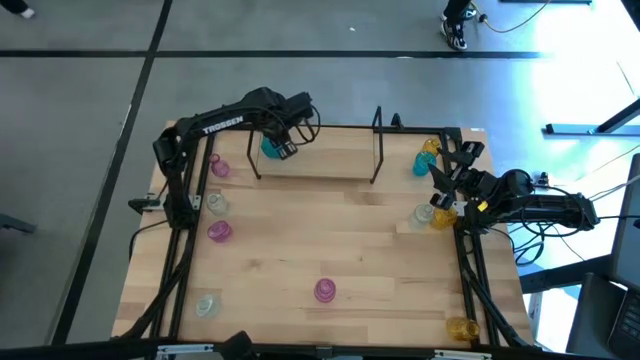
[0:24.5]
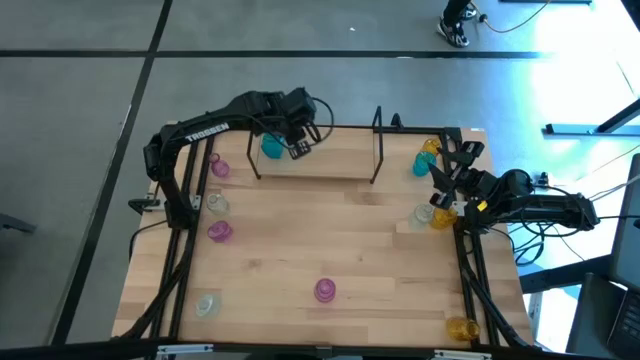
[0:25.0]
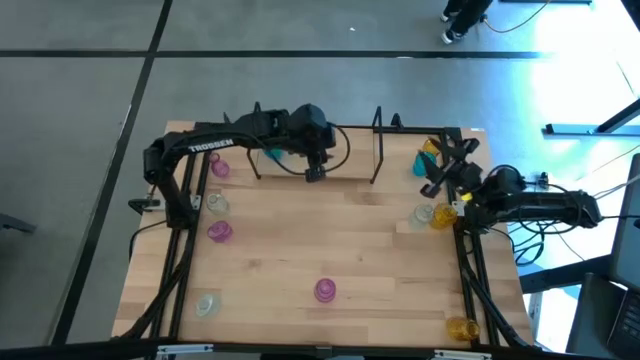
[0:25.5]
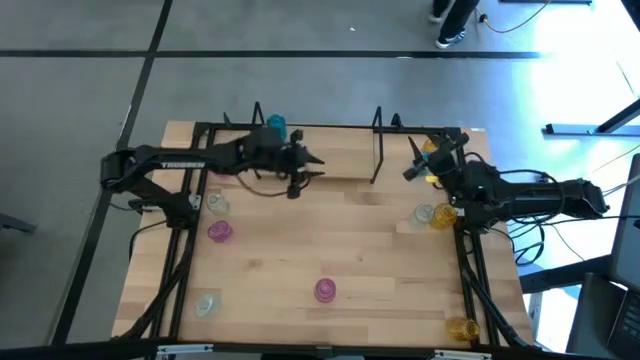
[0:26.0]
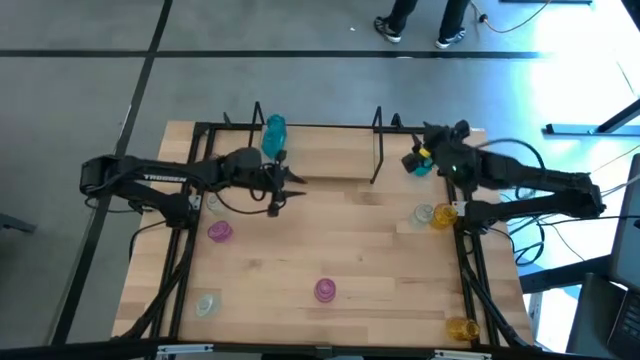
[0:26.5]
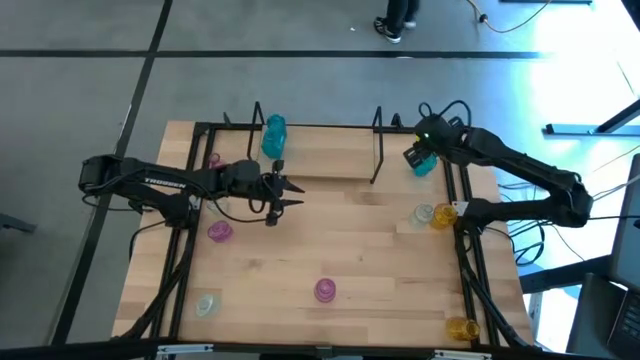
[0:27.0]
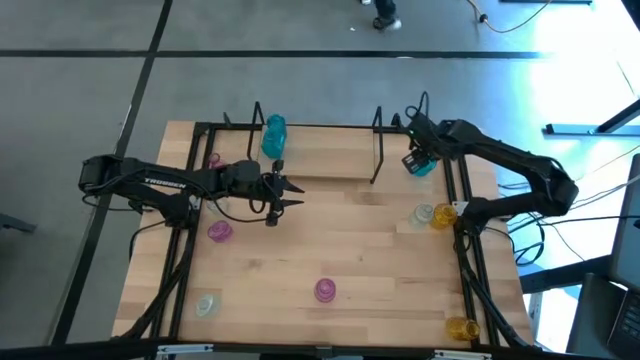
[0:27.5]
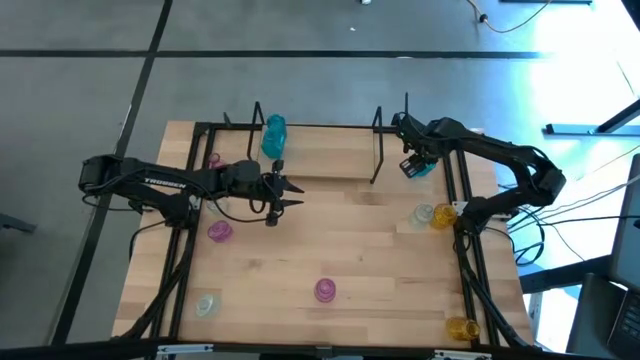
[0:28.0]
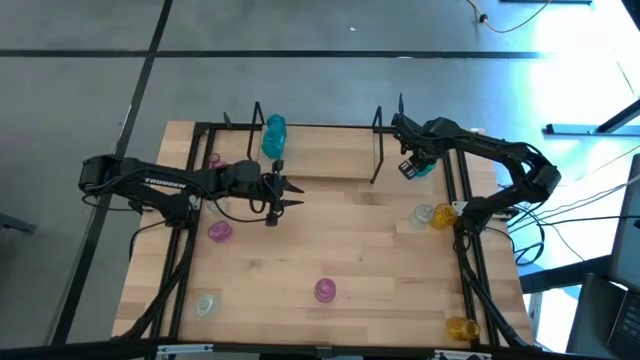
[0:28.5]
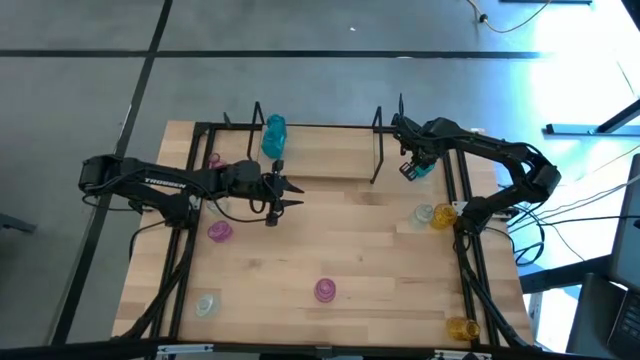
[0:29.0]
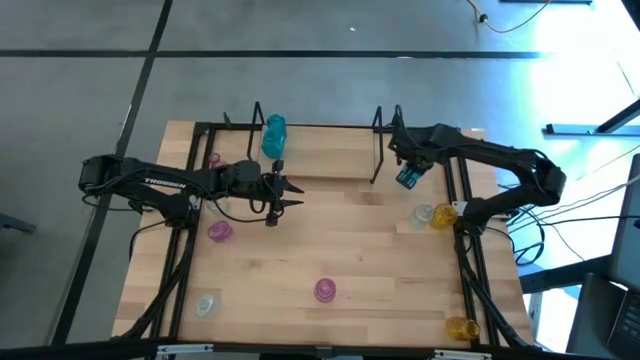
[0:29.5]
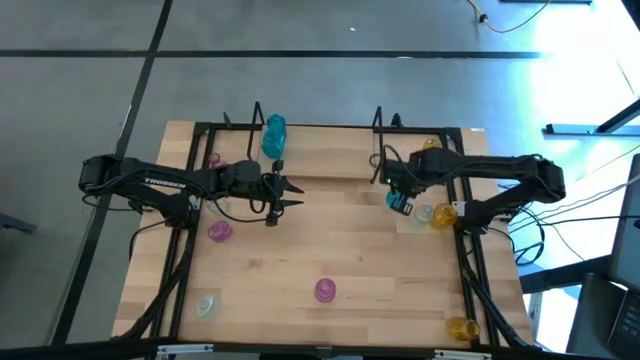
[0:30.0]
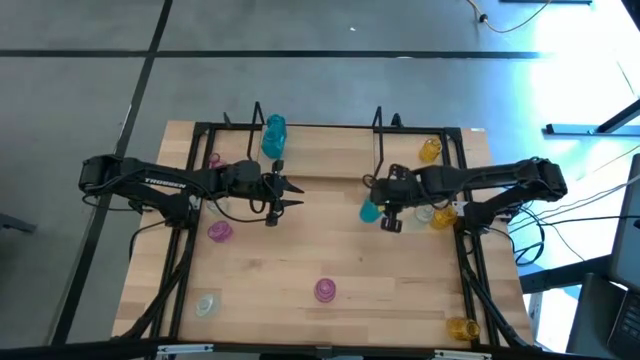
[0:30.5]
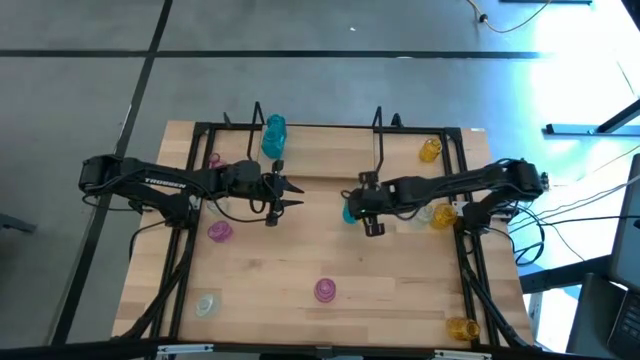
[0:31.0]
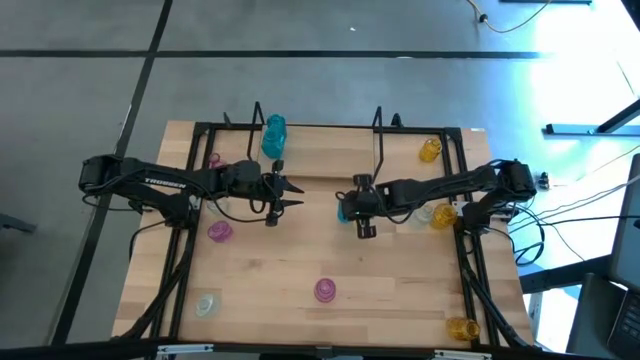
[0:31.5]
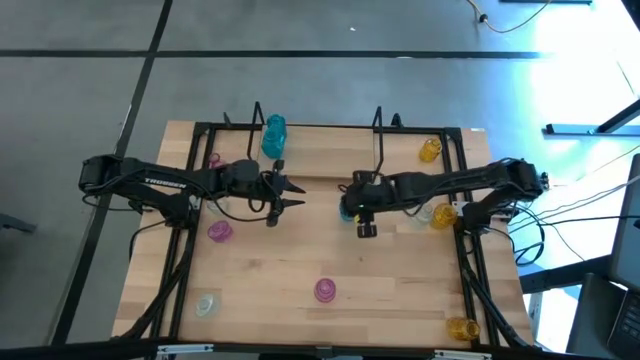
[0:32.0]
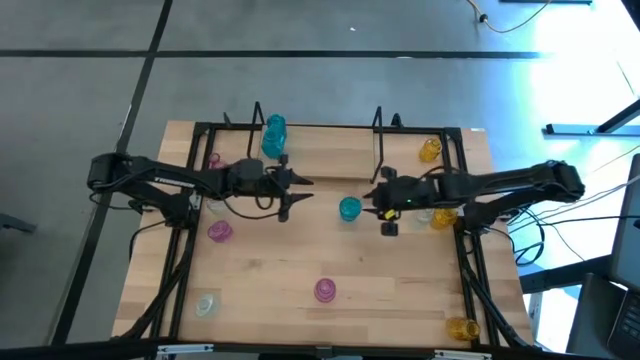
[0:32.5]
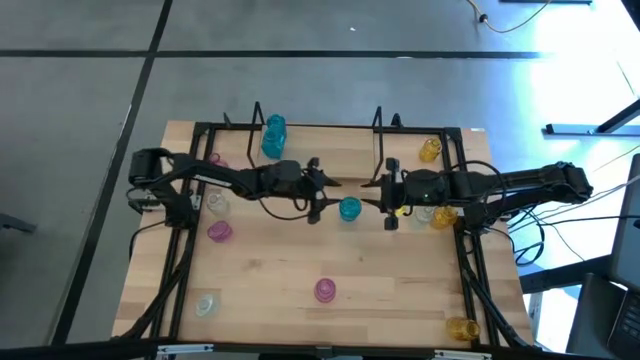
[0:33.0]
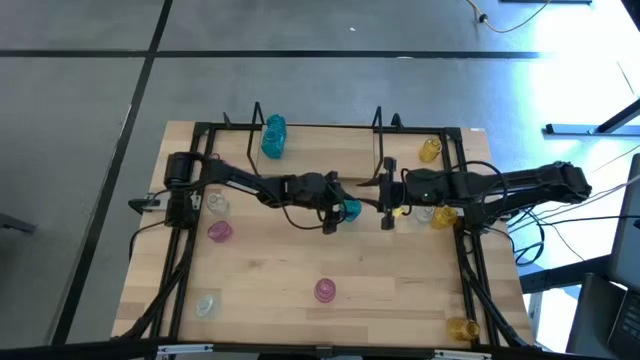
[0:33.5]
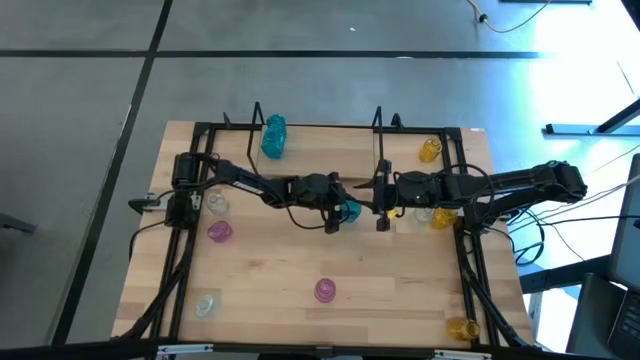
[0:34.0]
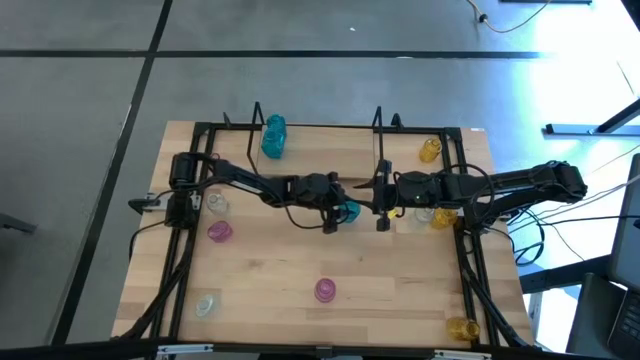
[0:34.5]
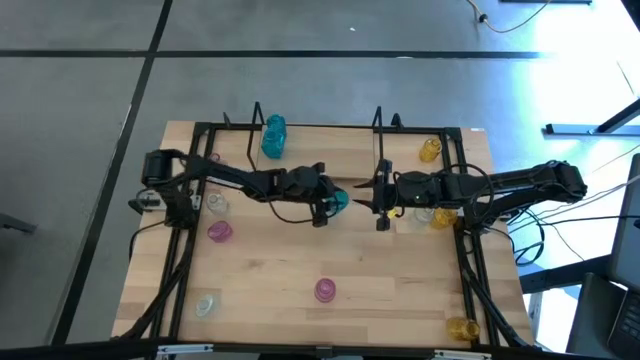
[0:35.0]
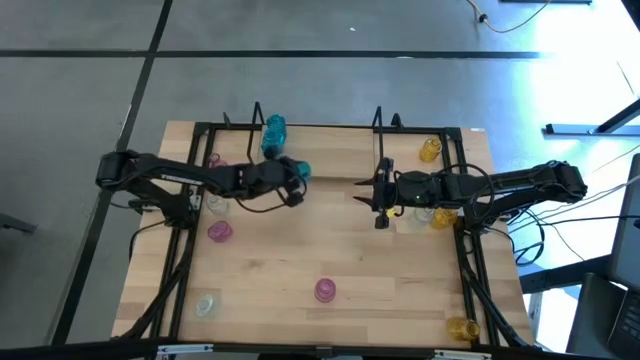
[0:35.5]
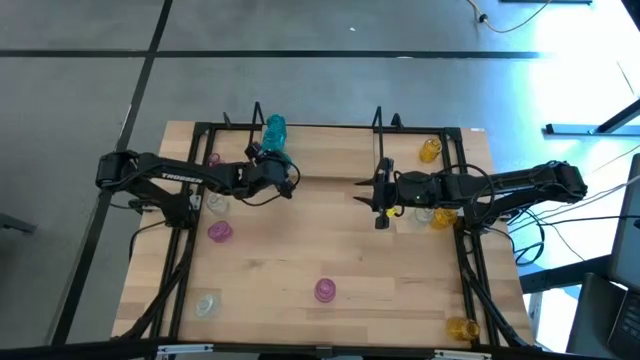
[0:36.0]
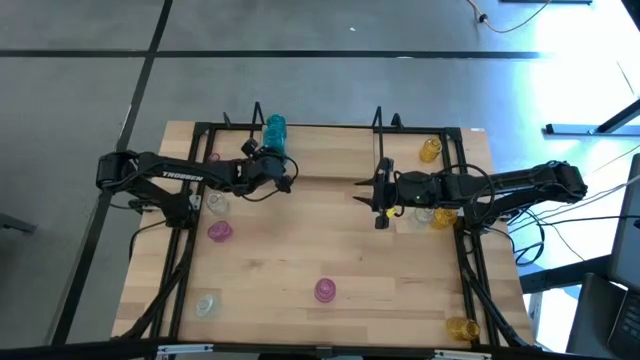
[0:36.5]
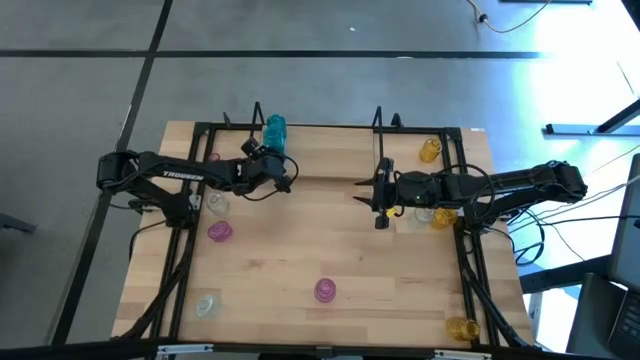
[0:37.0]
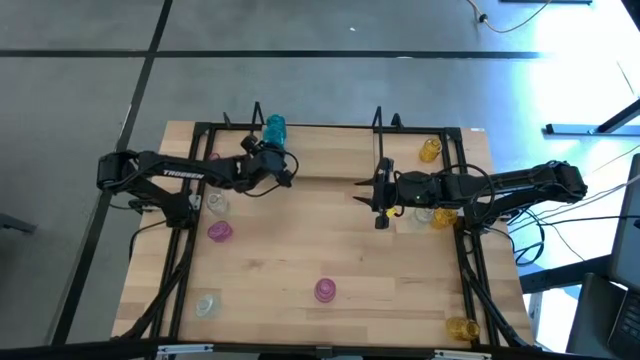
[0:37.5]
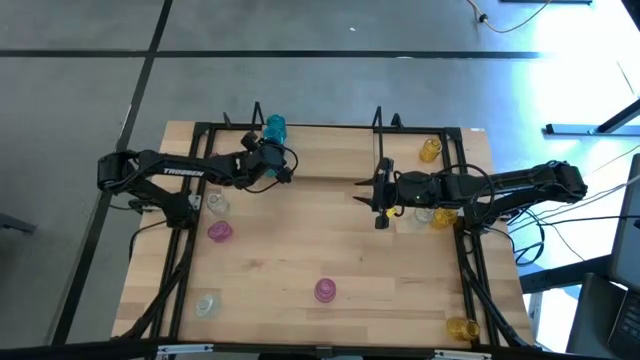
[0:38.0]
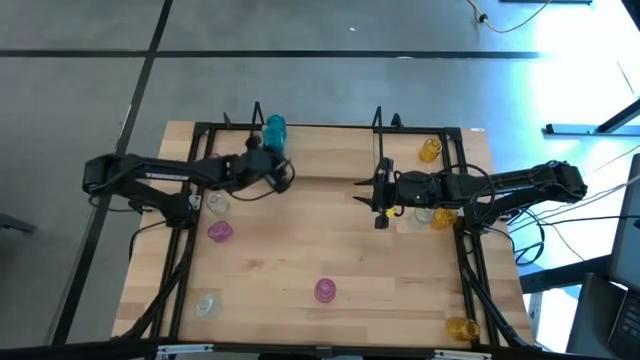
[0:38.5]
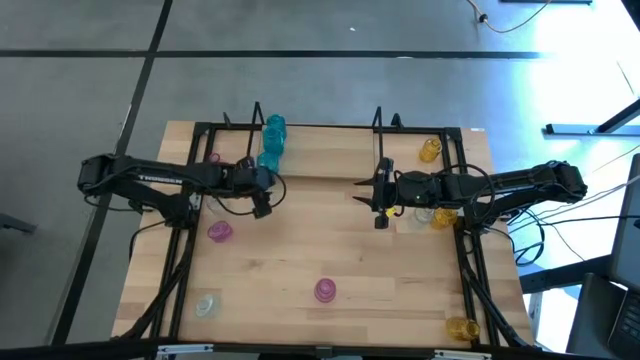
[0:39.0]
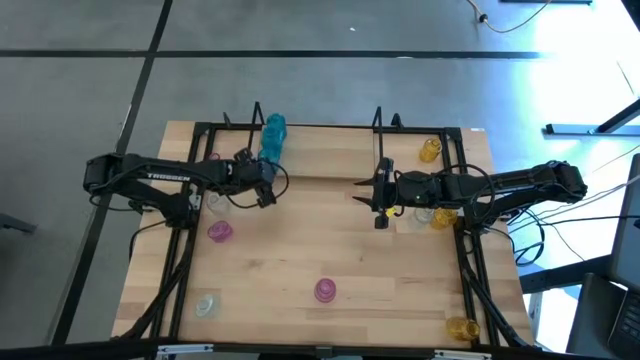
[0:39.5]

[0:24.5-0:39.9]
Task: sort vases onto shelf
Put the blue vase on the shelf aligned with the other blue vases

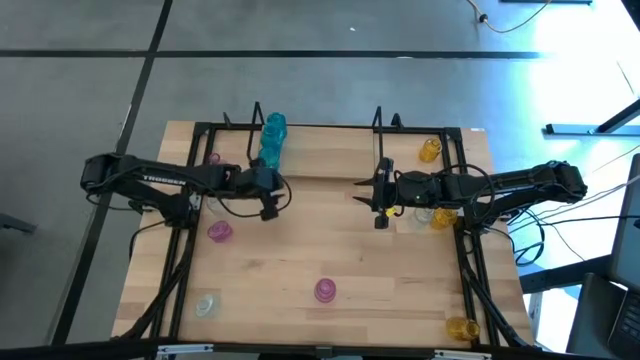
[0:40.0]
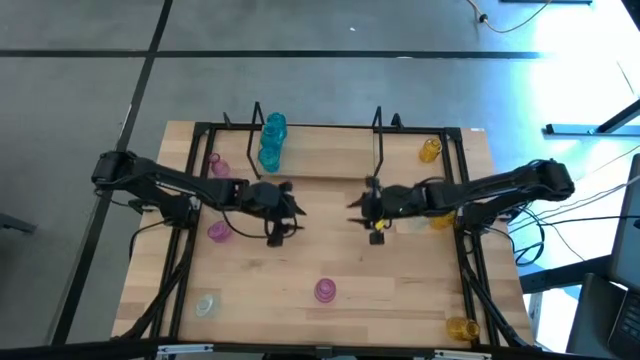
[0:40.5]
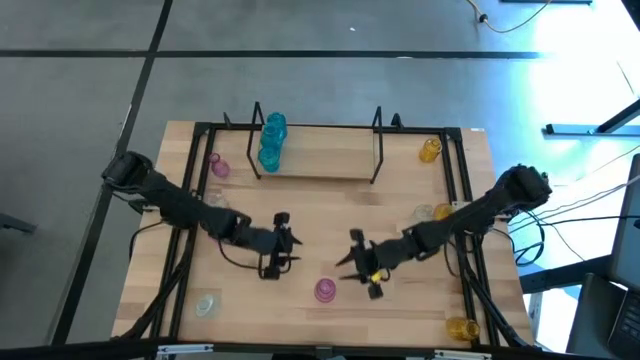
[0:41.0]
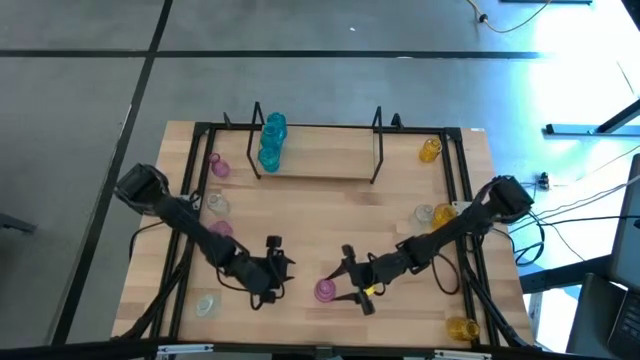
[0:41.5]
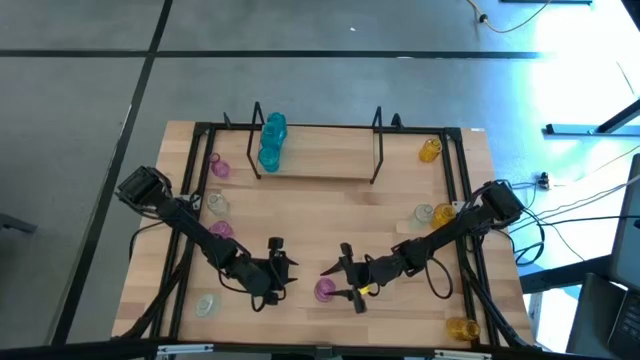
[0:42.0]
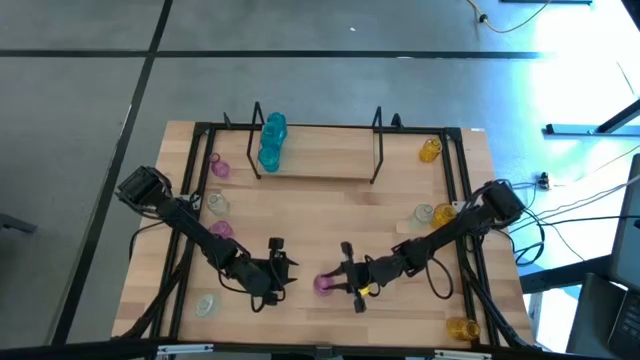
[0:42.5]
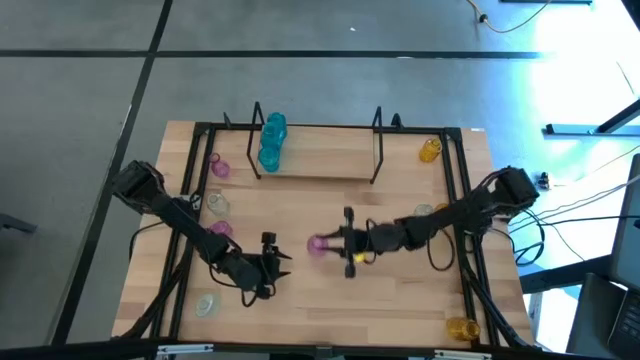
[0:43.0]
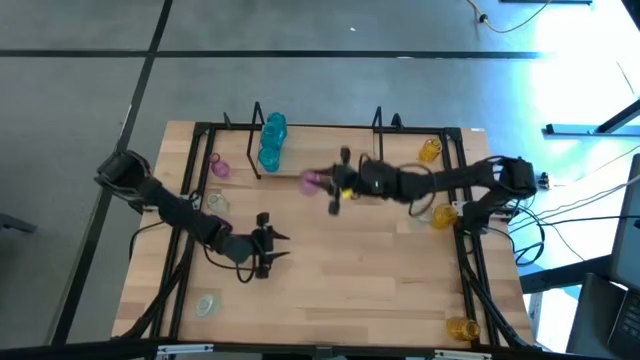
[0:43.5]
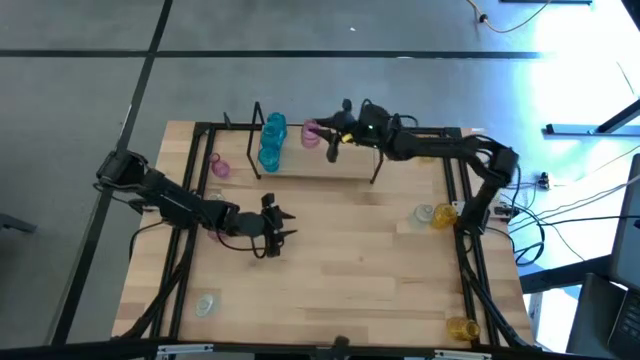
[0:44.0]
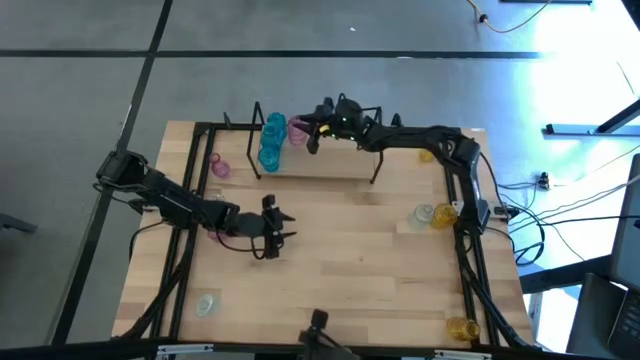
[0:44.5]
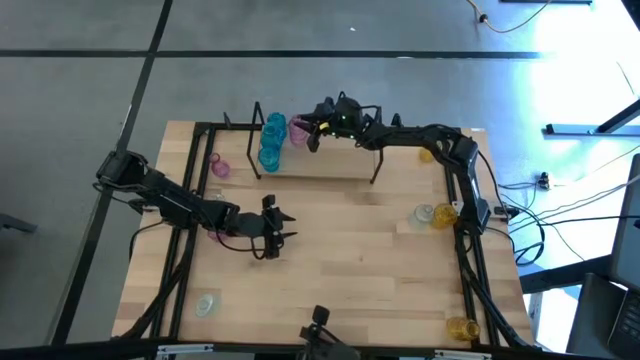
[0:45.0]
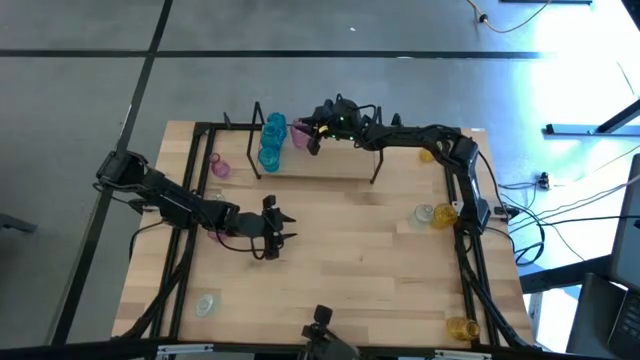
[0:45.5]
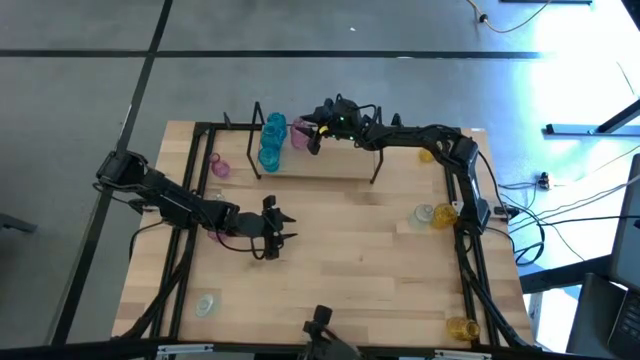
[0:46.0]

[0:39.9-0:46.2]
Put the bottom pink vase on the shelf
